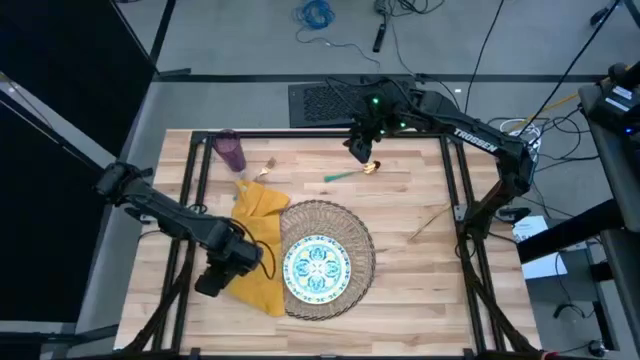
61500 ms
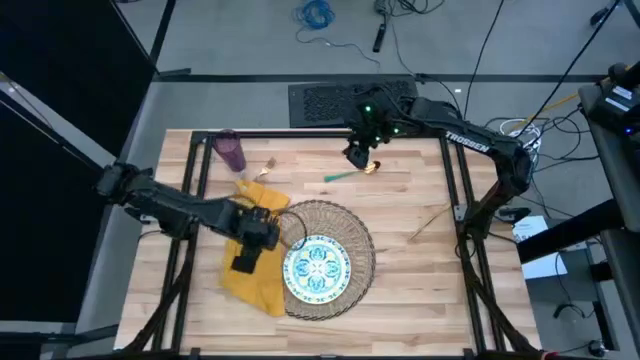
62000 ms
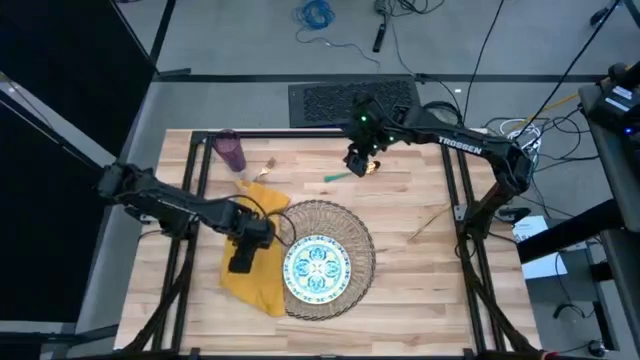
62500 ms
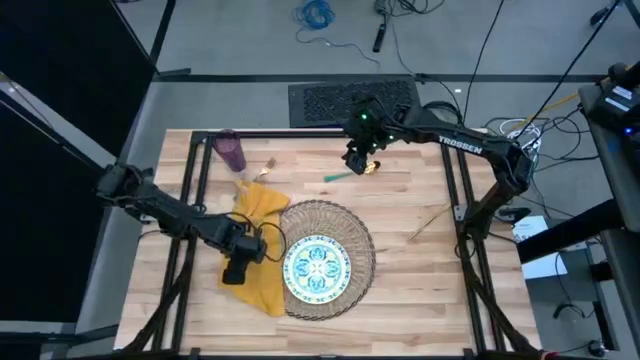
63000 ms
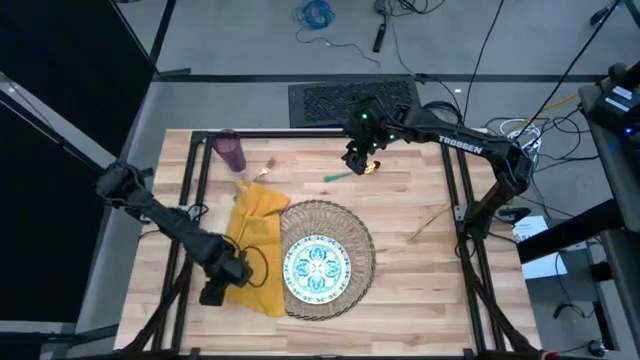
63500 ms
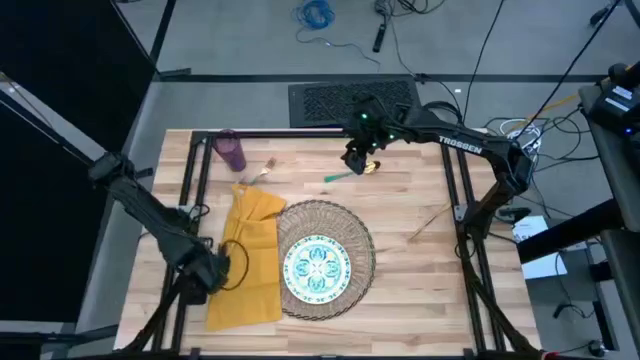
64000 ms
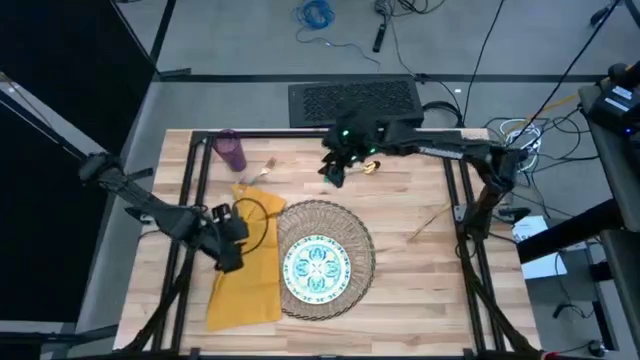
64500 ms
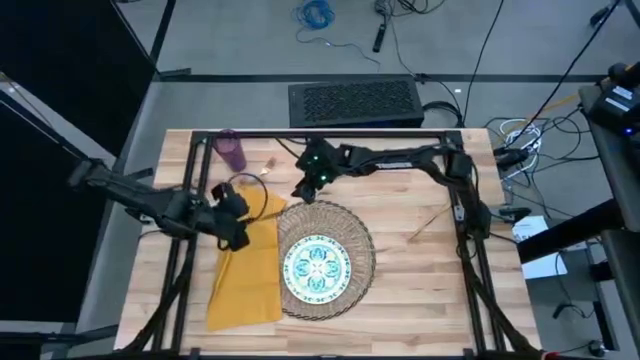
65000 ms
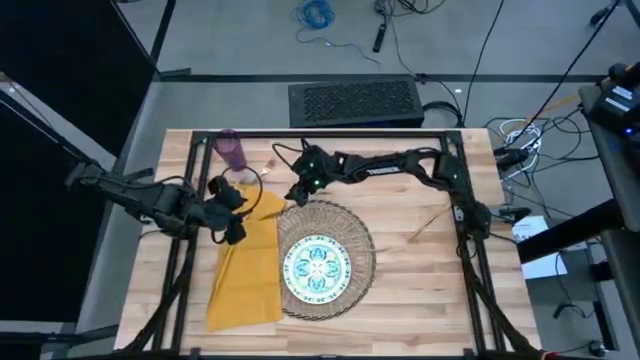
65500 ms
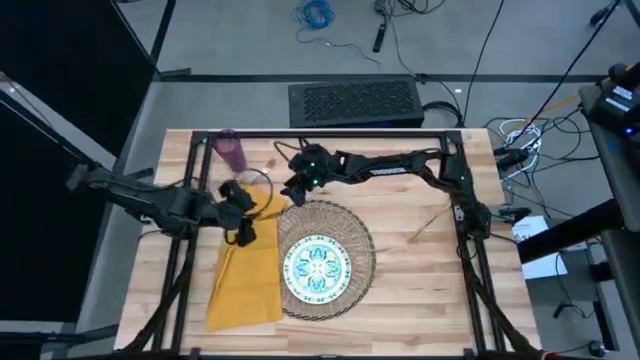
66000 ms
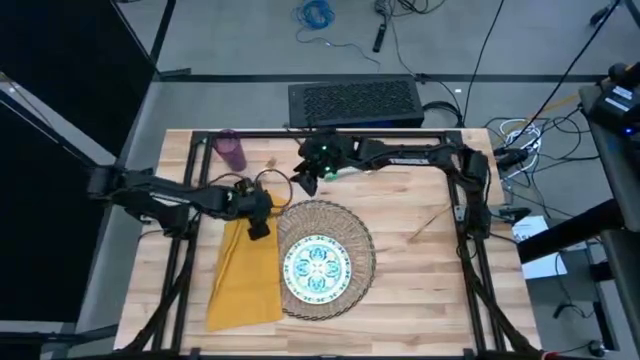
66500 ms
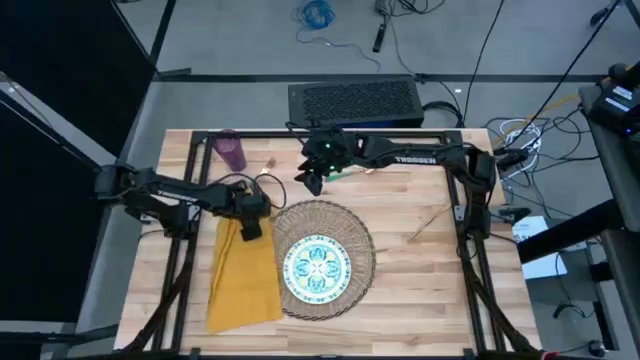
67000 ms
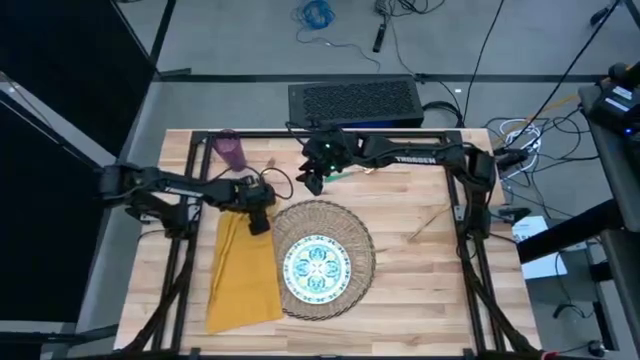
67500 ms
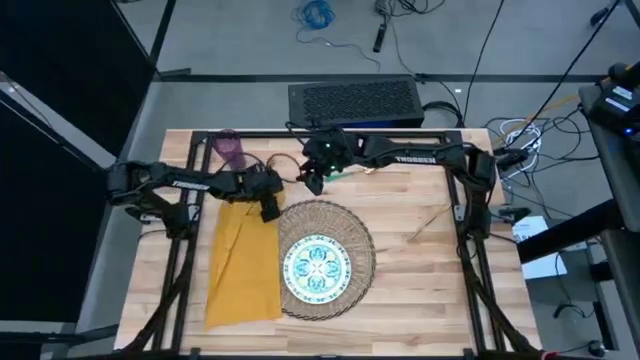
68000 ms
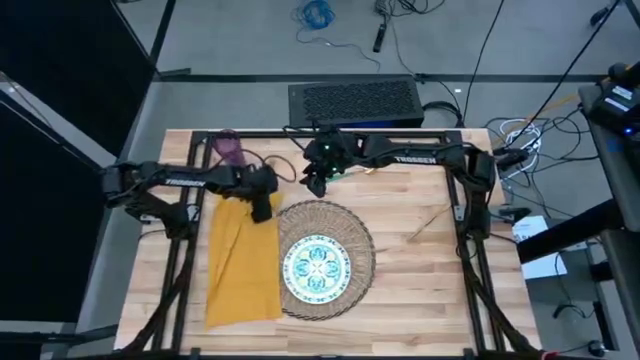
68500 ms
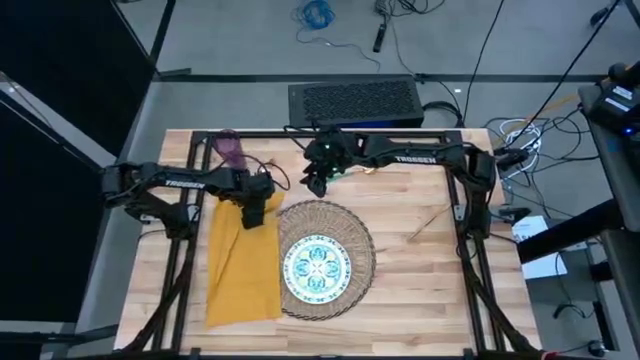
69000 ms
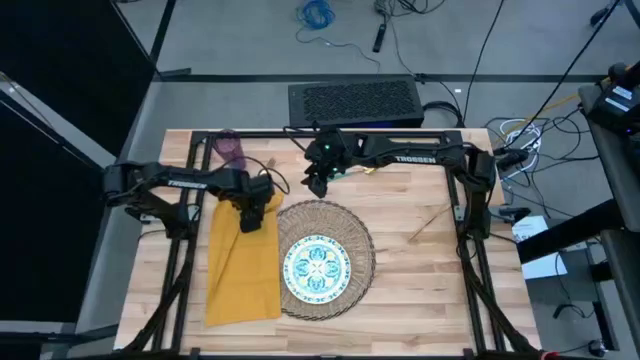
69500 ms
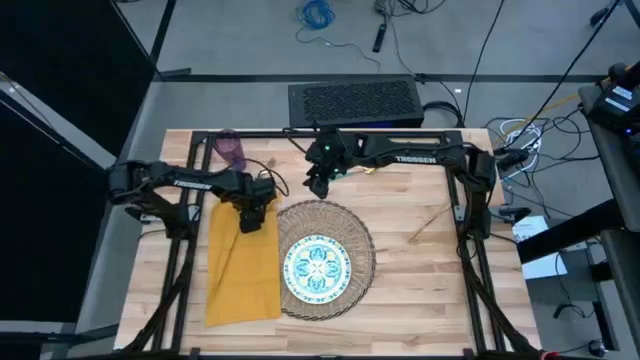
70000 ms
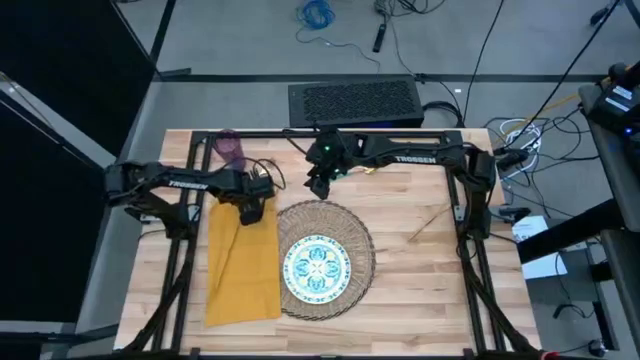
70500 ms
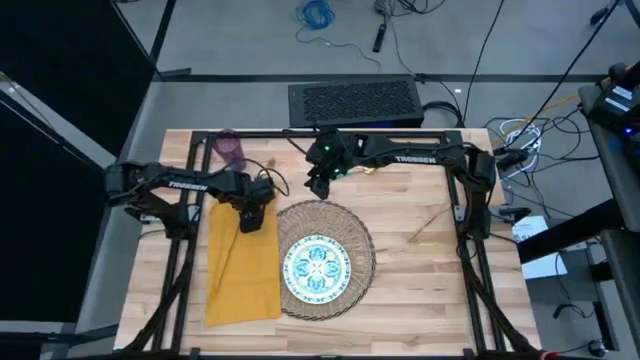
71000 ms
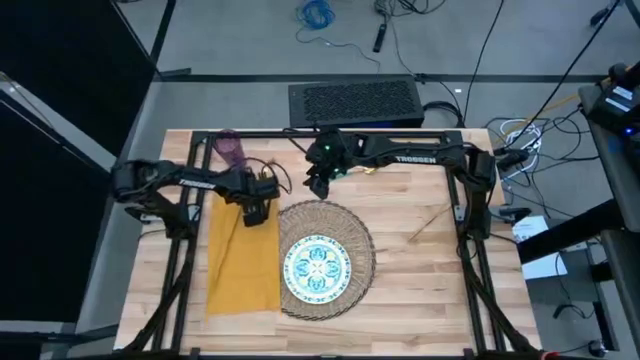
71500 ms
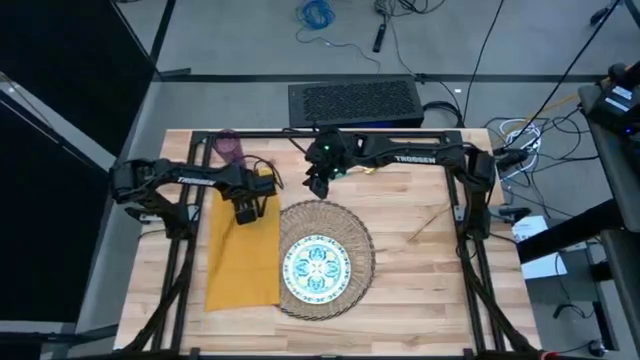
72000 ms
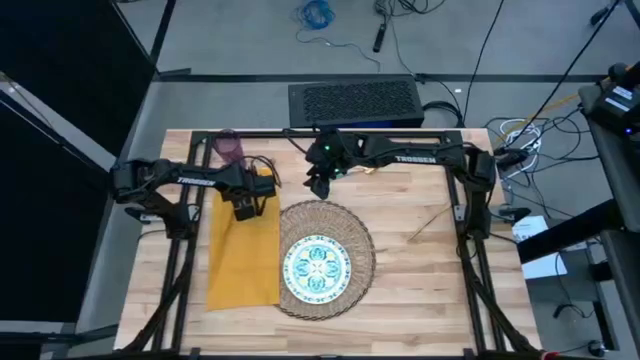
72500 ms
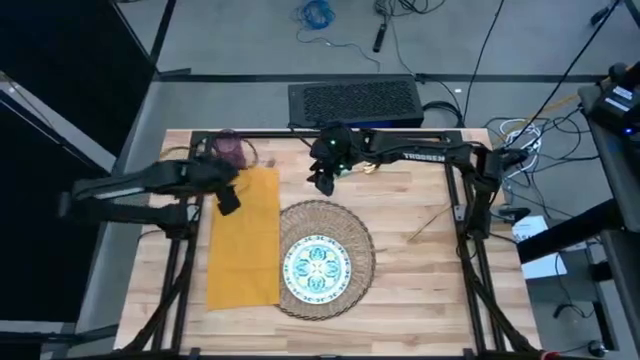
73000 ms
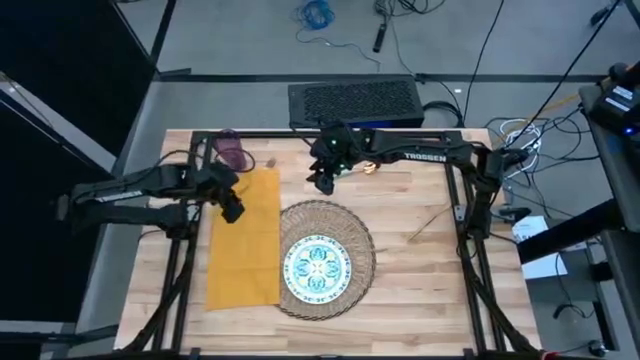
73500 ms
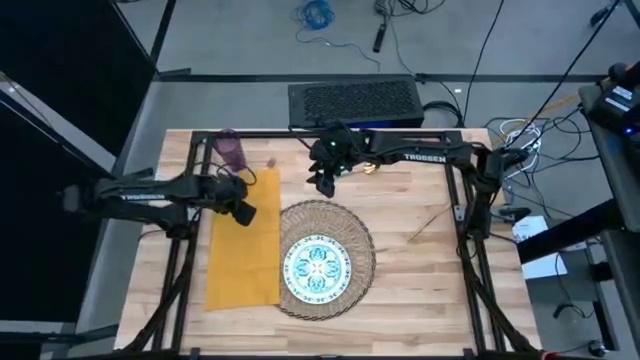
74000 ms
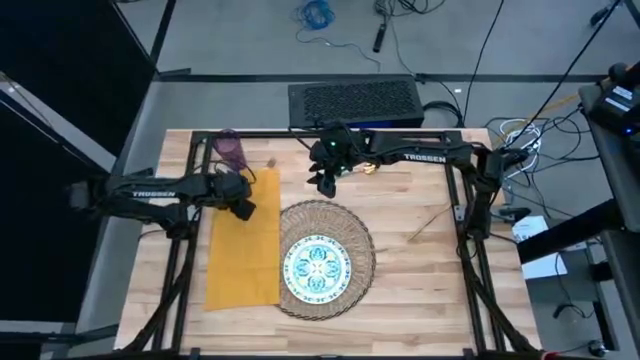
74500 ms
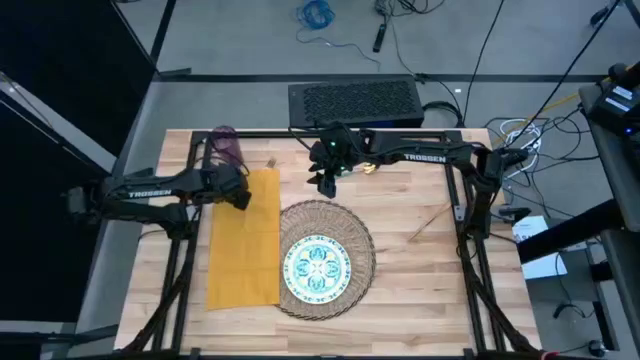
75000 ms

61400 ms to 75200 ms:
Task: Set table place
Fold the yellow table napkin

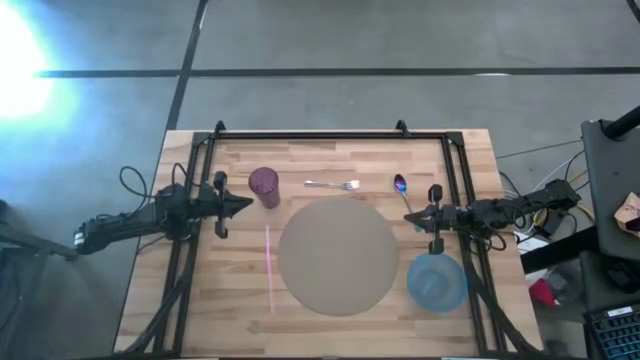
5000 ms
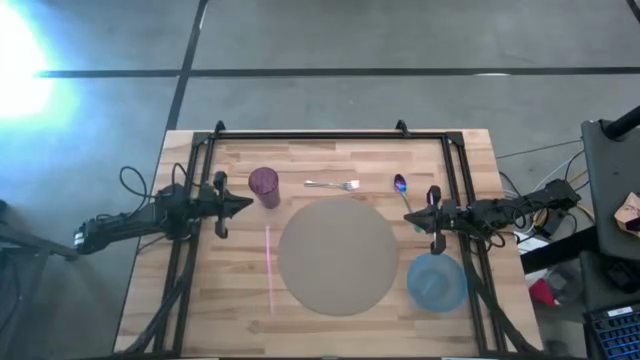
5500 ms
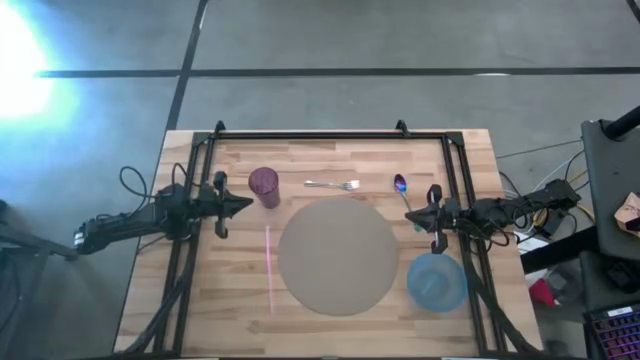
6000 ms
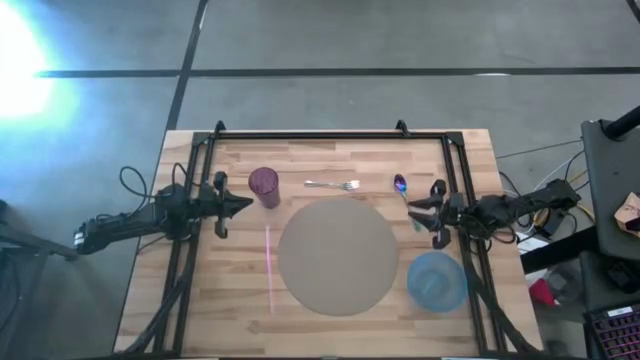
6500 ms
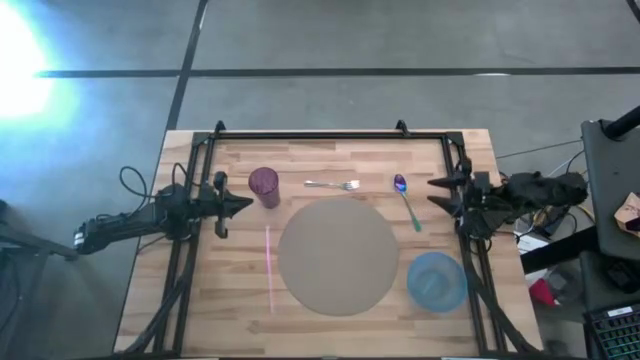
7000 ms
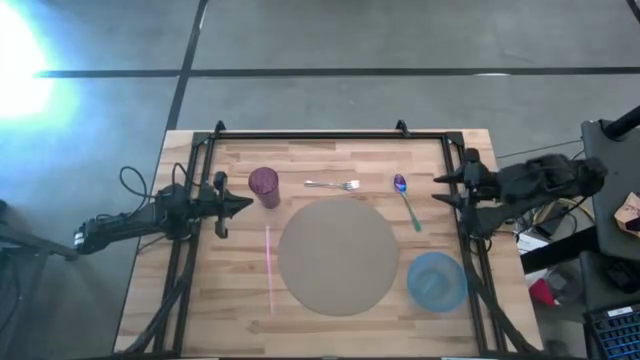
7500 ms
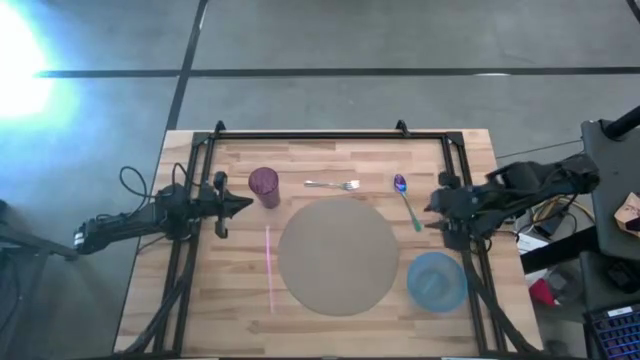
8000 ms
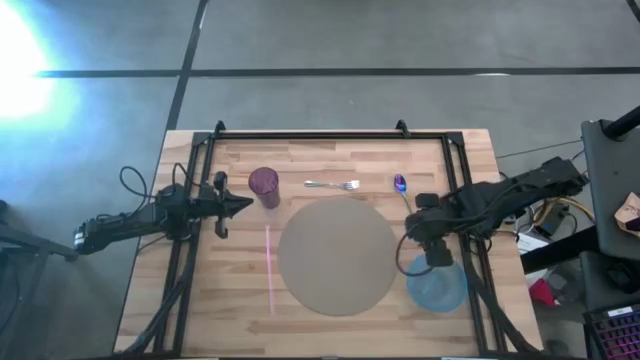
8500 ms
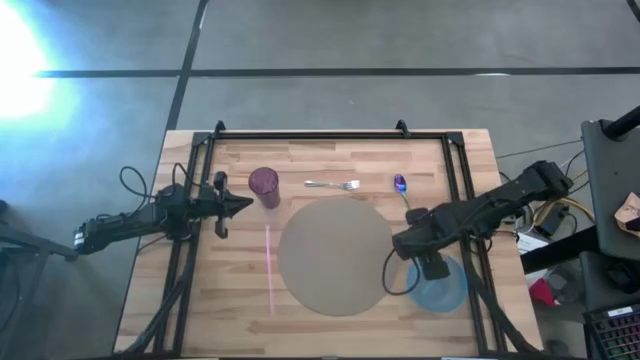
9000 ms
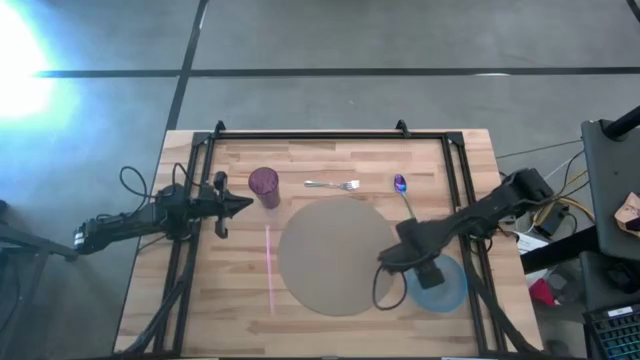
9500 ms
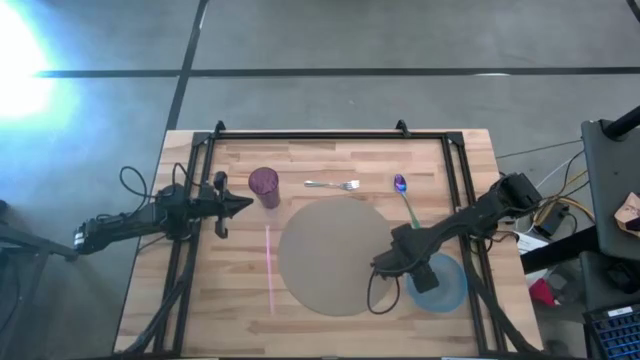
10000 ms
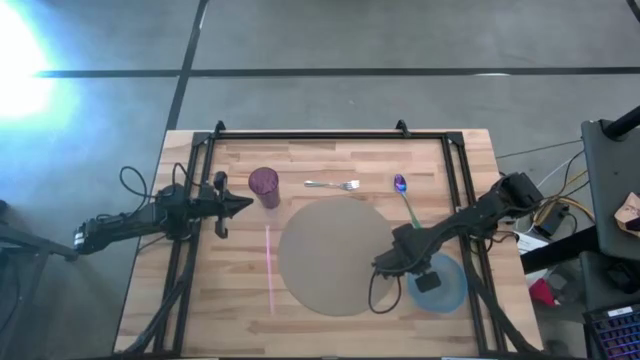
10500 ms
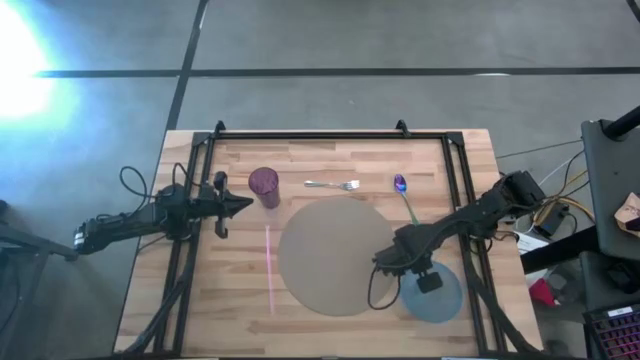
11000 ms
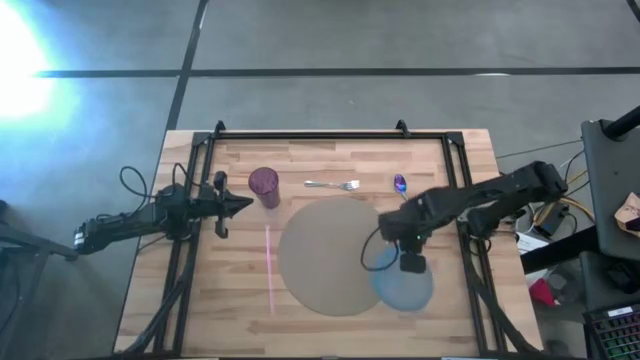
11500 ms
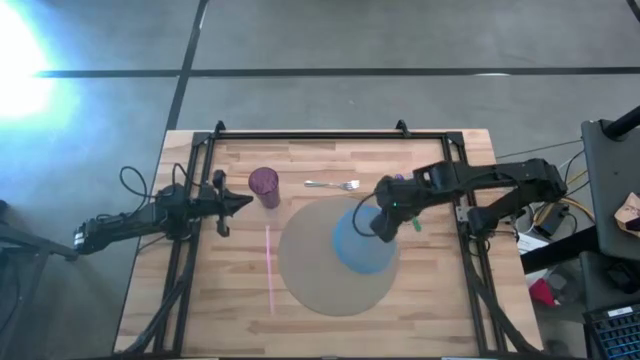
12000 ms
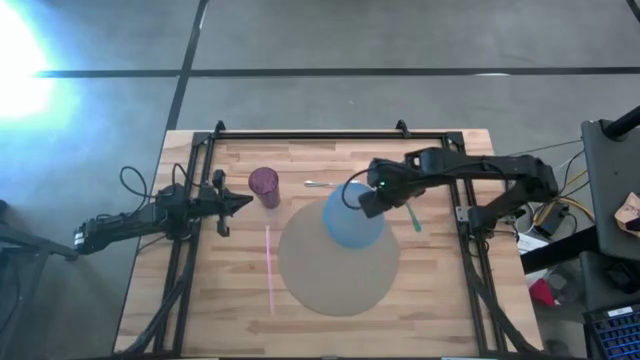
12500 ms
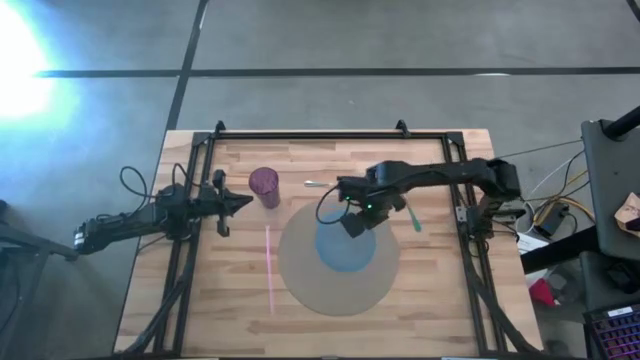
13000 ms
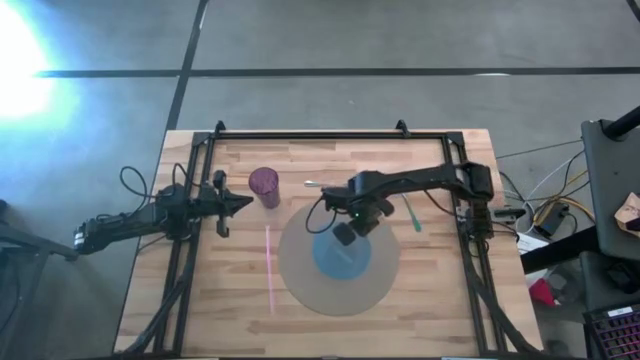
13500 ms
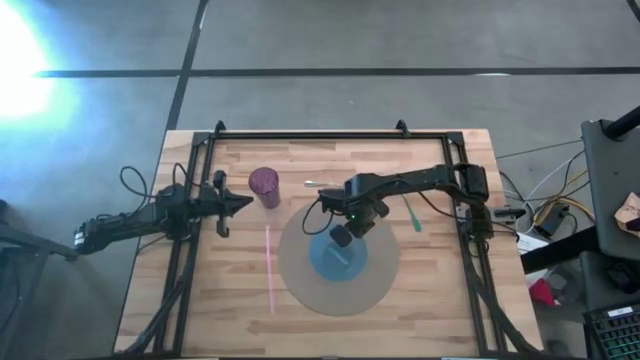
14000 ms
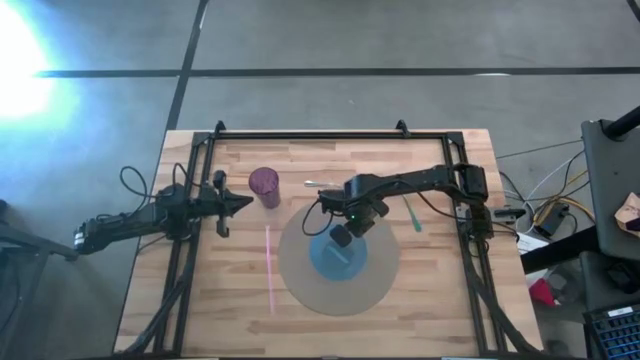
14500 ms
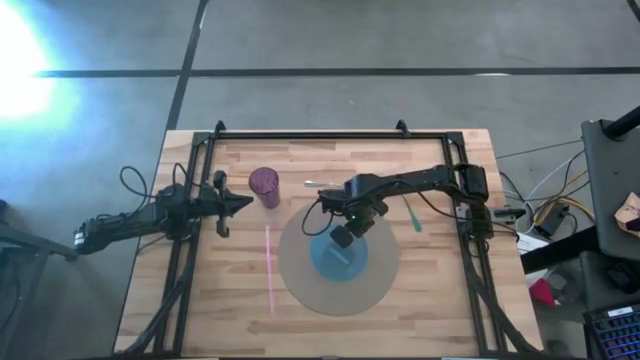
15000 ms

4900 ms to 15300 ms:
Task: Pick & Place Utensil
Put the blue bowl in the center of the brown mat
